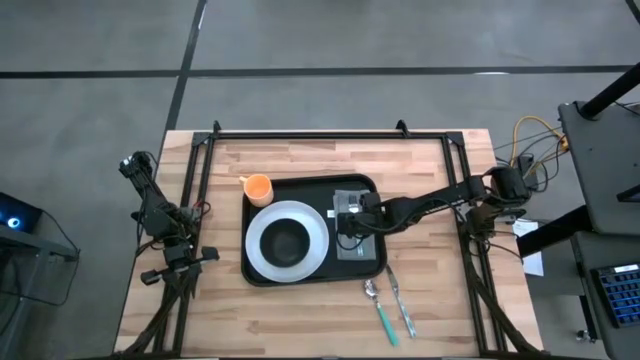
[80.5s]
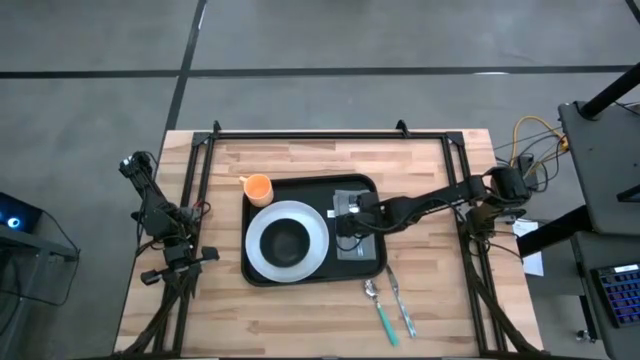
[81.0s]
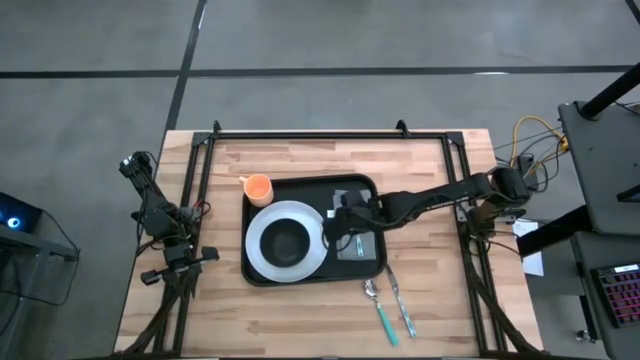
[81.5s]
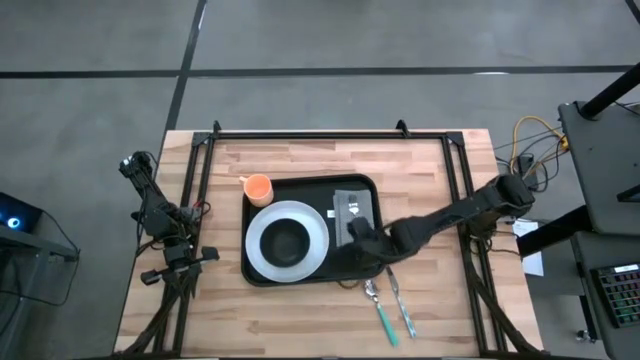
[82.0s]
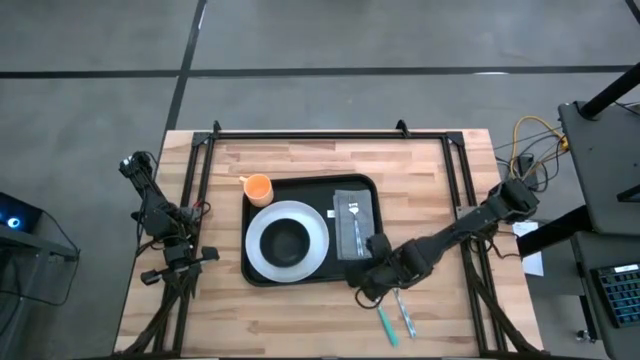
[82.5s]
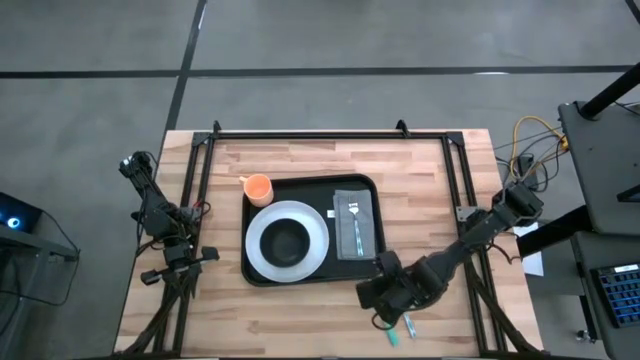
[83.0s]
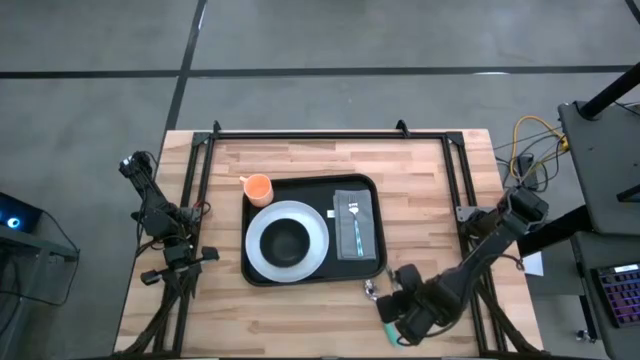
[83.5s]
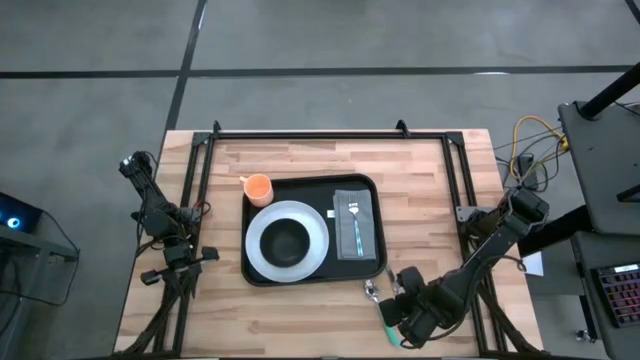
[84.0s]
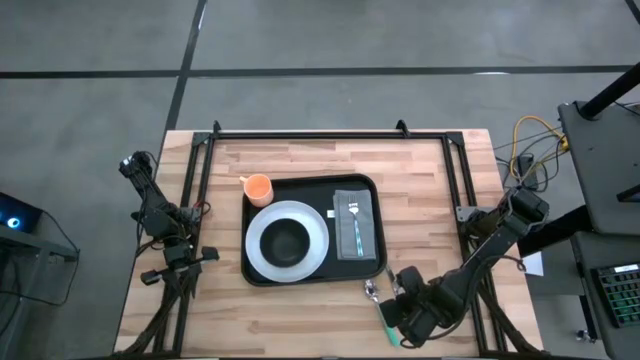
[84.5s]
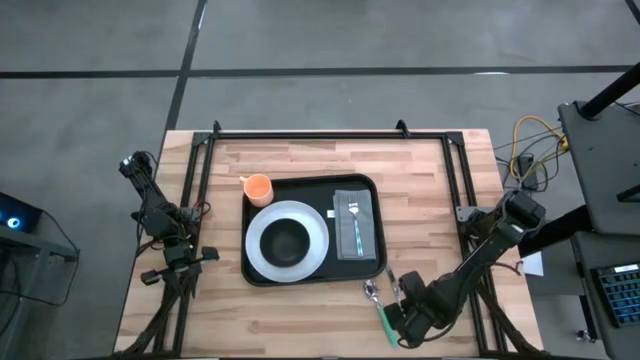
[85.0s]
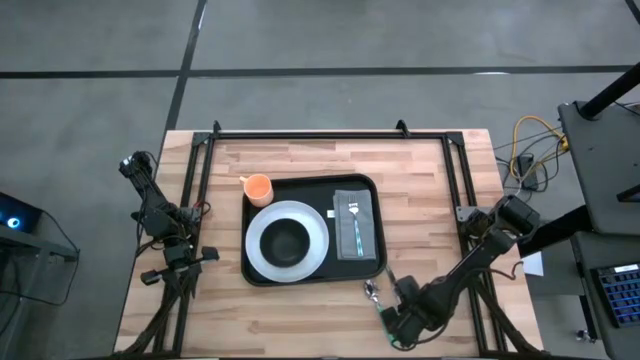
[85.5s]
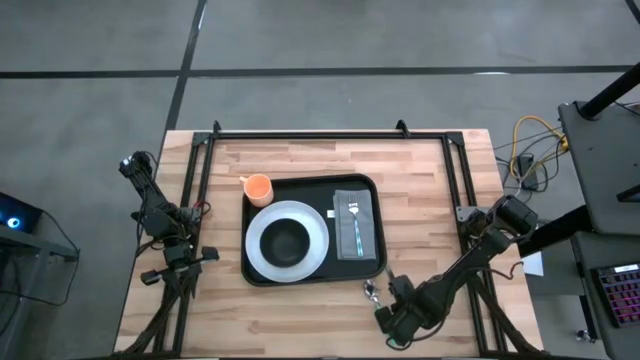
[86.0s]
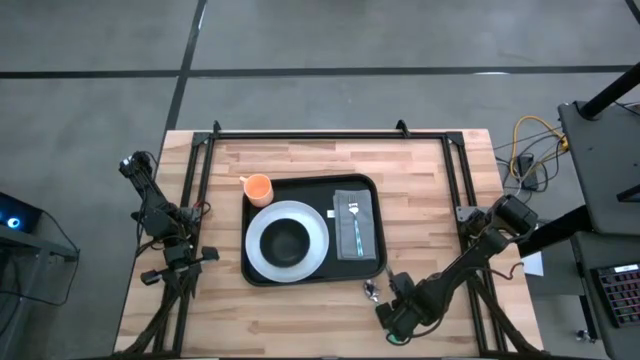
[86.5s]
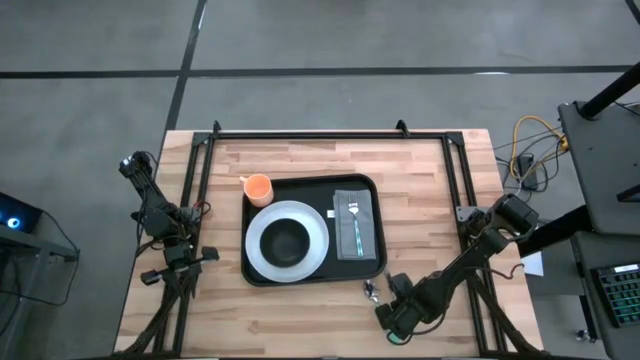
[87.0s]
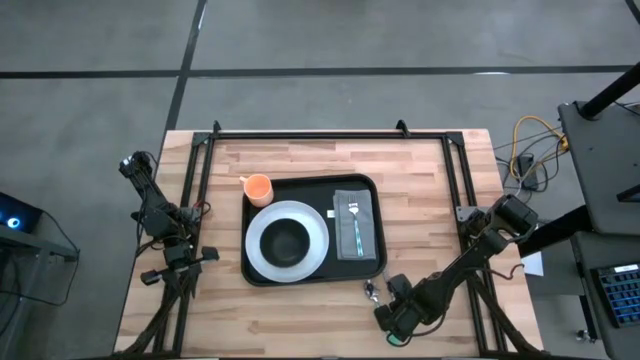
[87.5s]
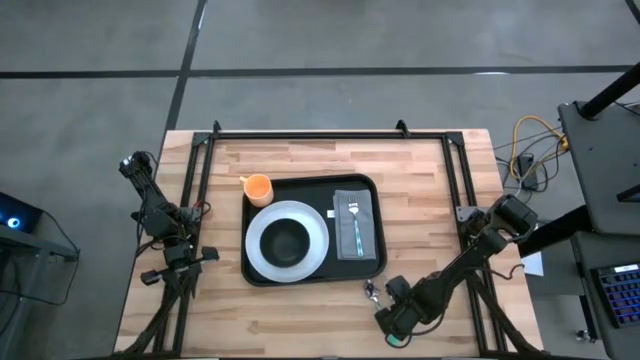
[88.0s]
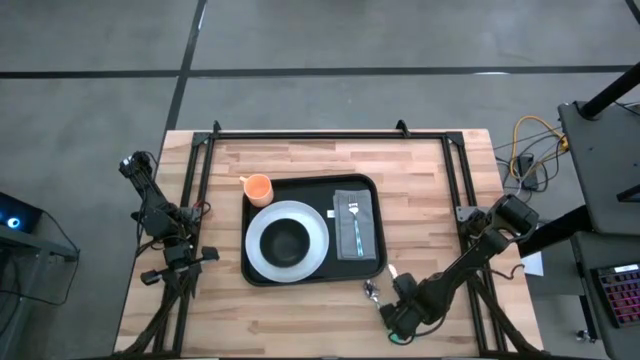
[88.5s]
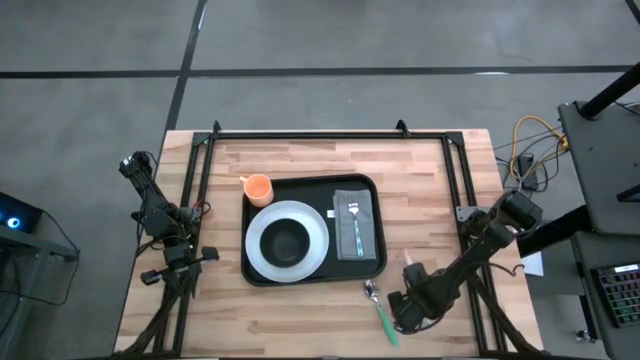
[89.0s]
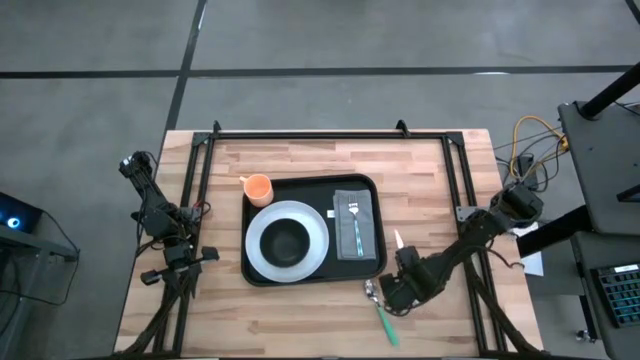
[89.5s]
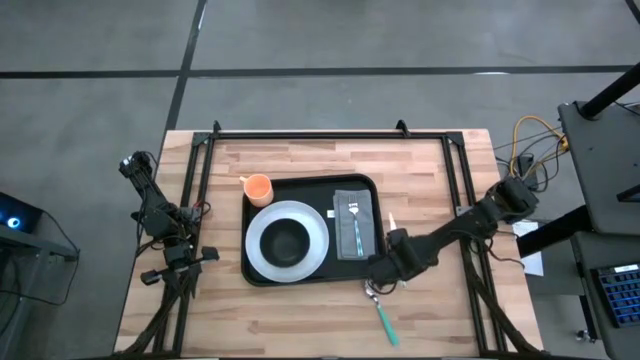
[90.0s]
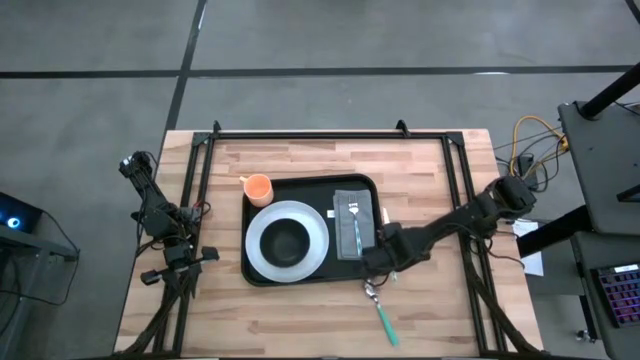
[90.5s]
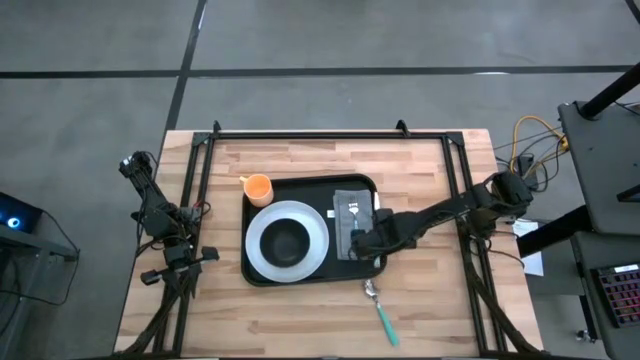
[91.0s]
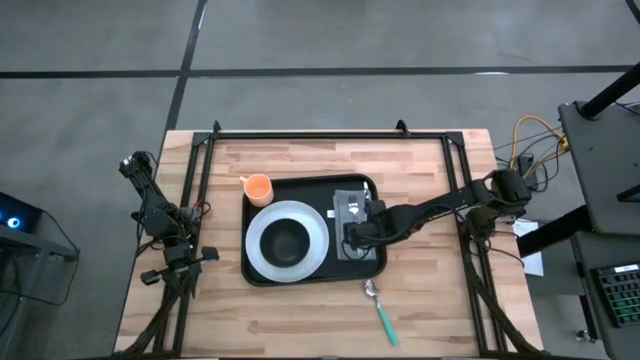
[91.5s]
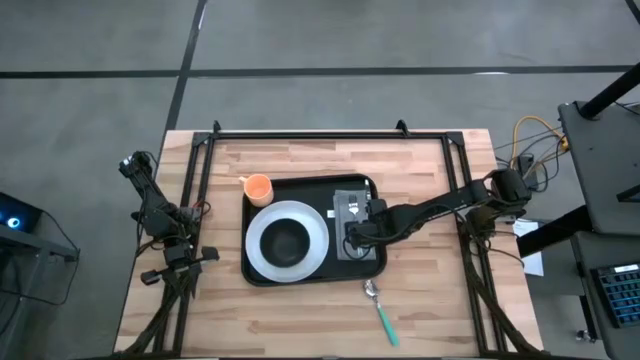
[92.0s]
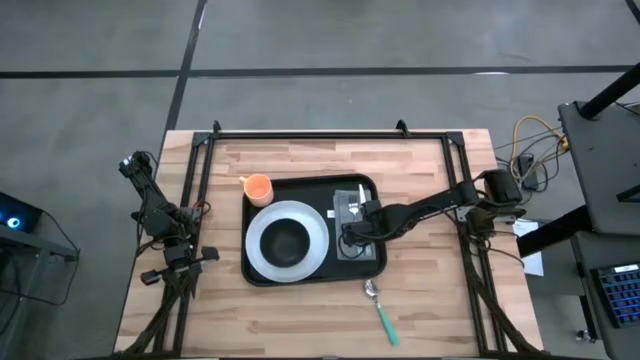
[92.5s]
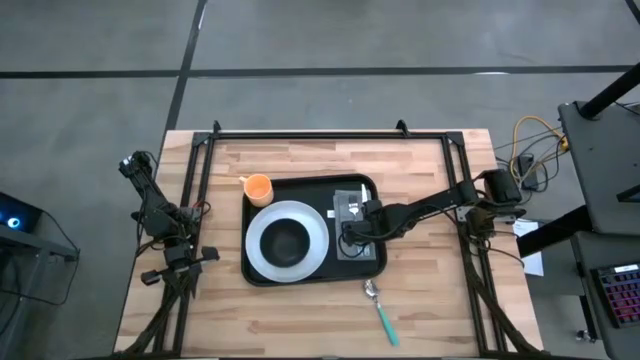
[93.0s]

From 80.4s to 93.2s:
Task: Set up tray
Put the green table knife on the gray table napkin to the right of the green fork

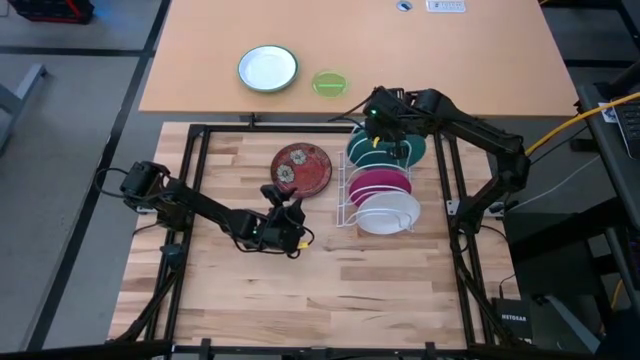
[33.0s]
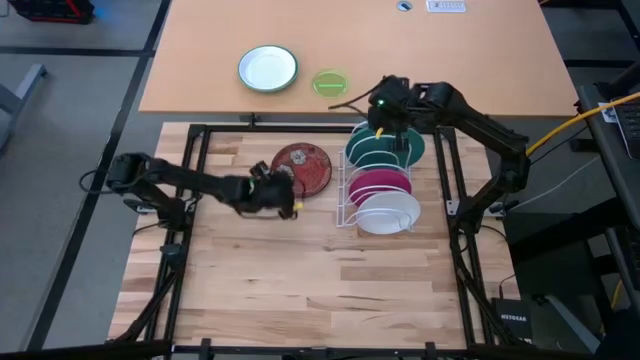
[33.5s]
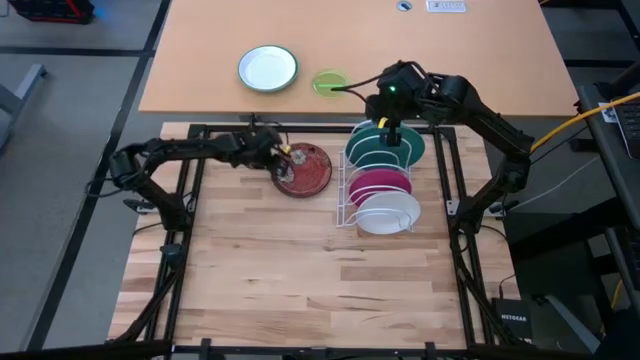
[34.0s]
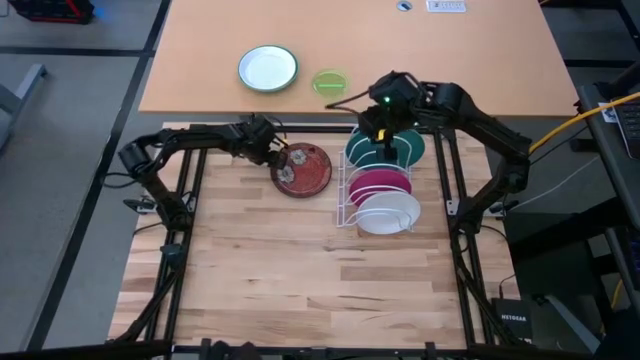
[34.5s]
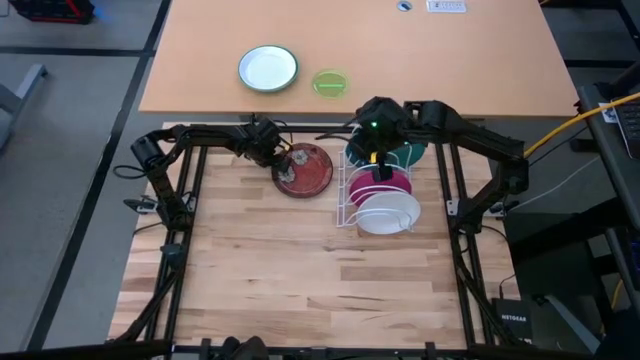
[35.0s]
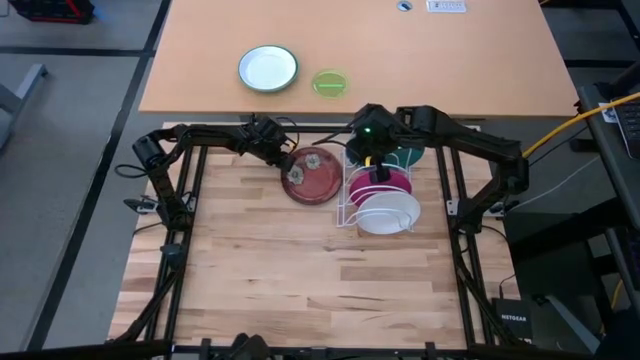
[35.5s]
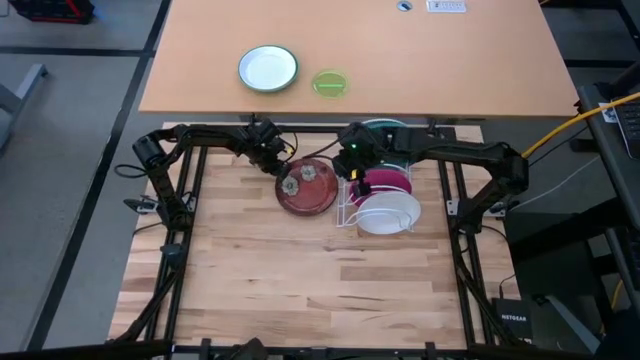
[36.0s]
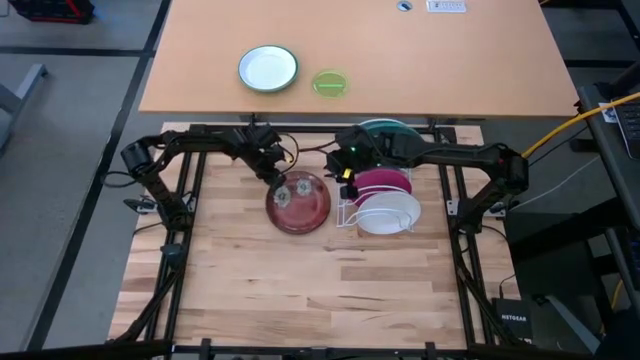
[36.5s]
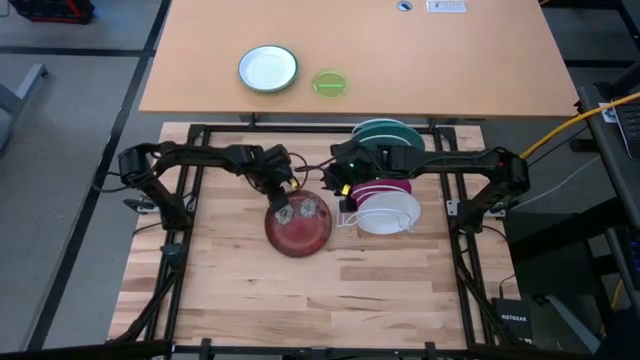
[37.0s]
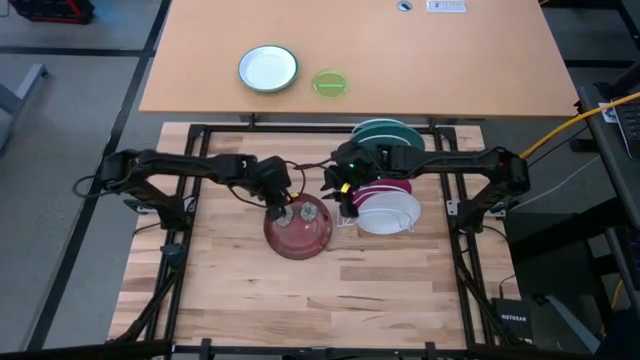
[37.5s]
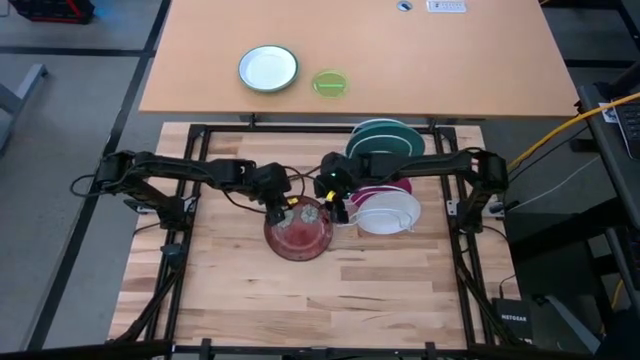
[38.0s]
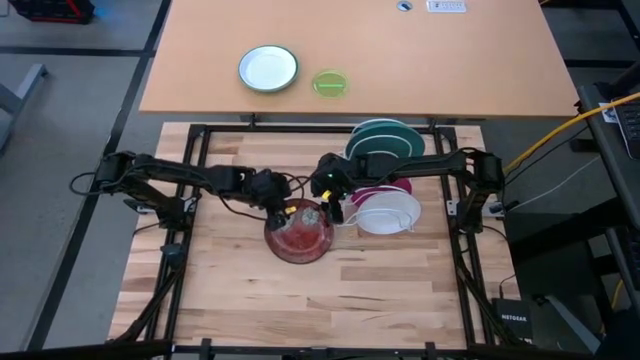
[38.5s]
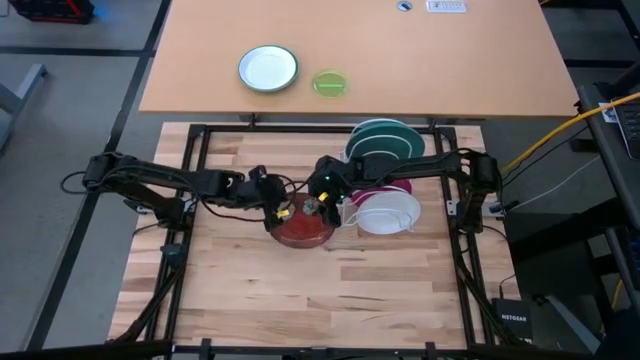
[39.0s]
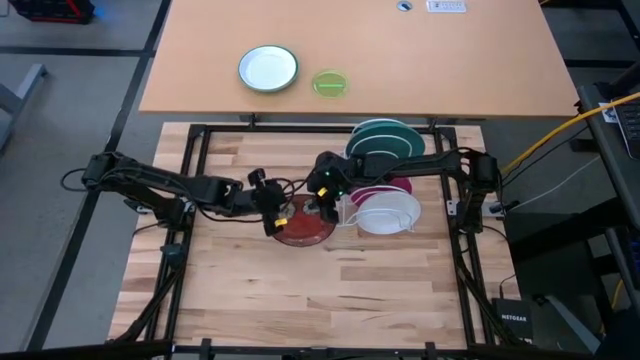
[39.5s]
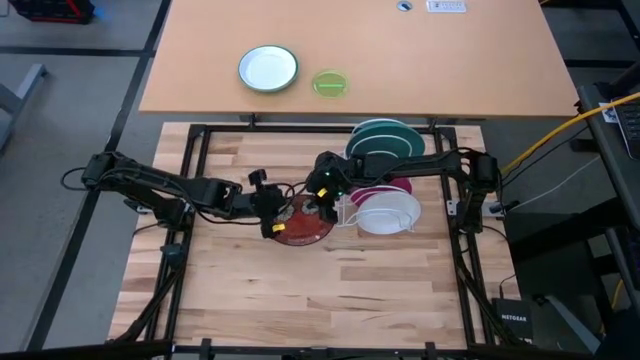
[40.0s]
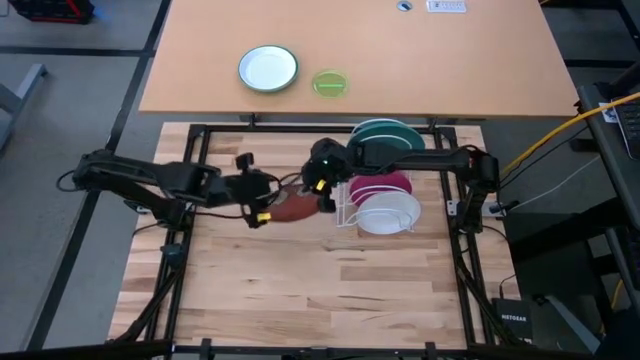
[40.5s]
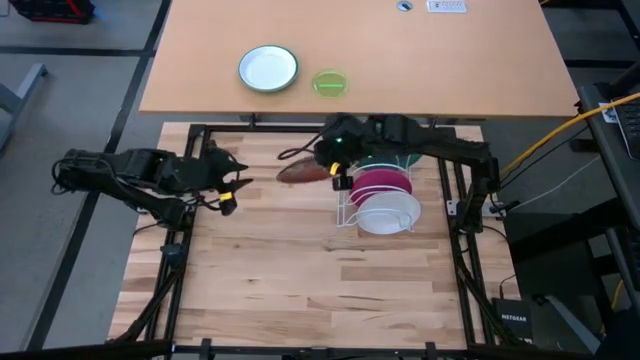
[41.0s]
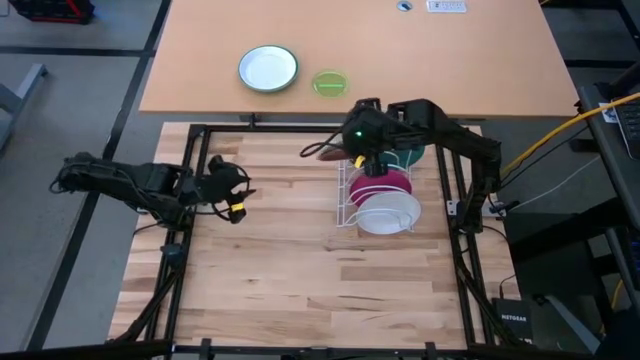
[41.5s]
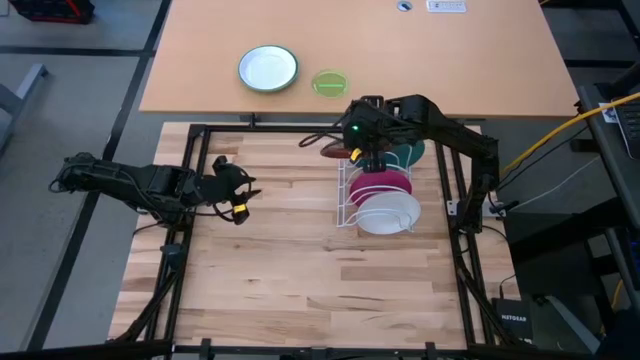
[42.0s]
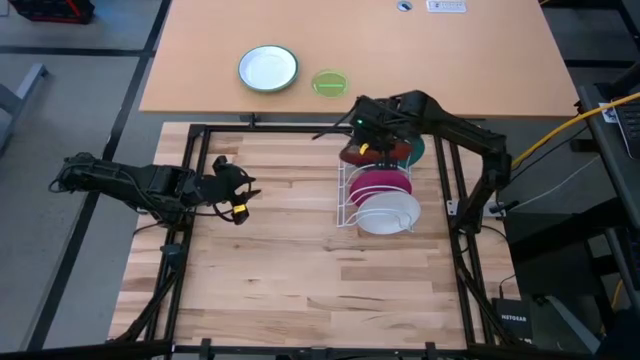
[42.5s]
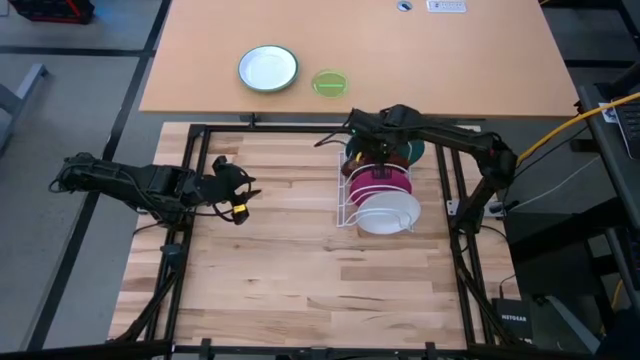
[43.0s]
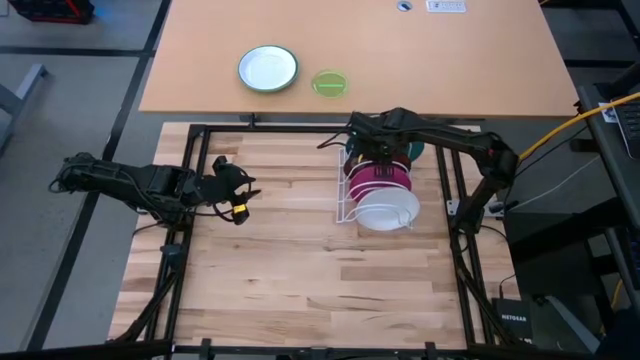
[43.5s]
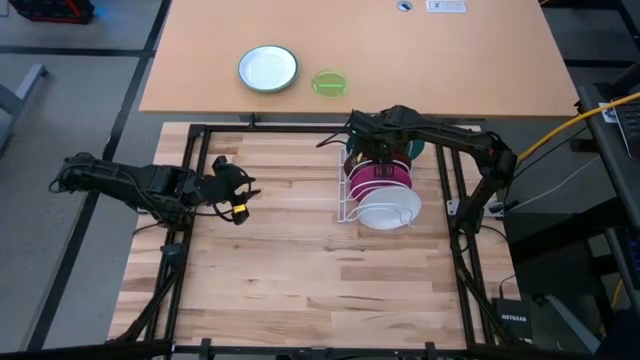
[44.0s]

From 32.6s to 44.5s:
Task: Sort dishes
Put the red plate in the dish rack
